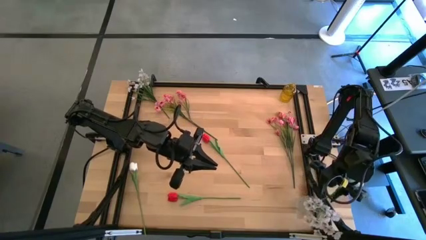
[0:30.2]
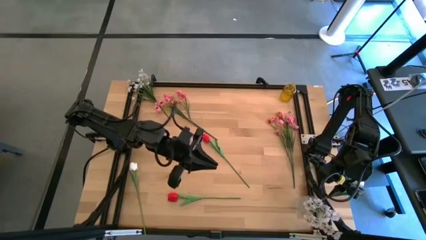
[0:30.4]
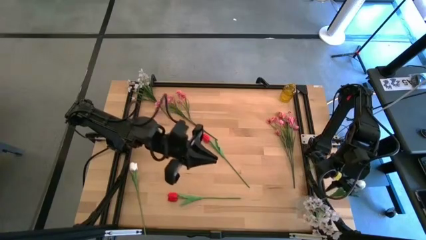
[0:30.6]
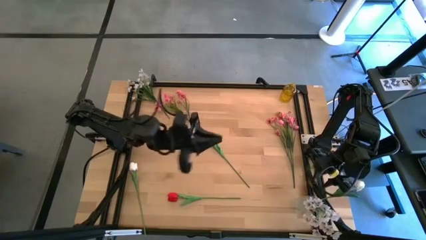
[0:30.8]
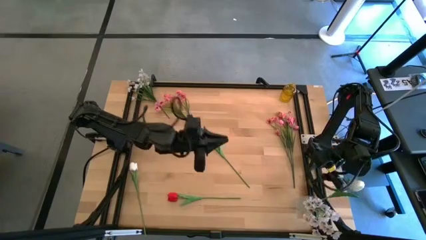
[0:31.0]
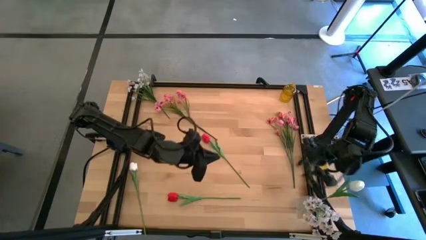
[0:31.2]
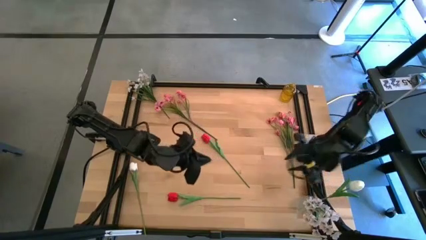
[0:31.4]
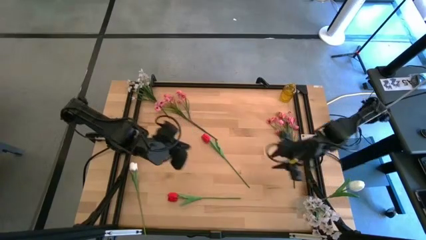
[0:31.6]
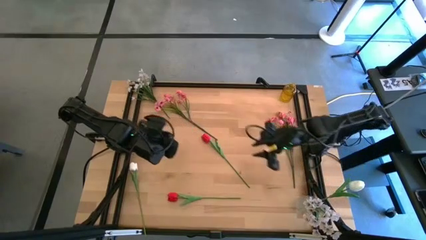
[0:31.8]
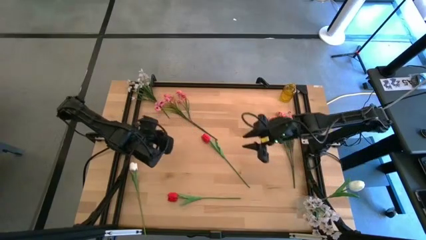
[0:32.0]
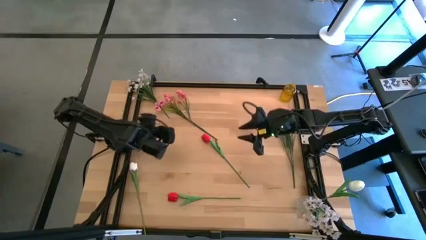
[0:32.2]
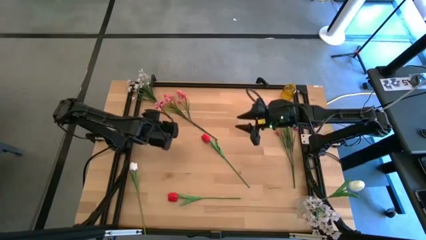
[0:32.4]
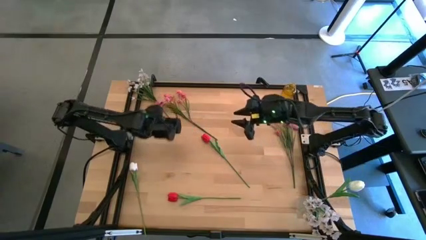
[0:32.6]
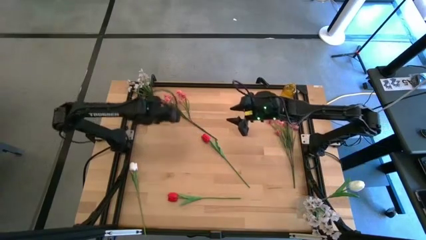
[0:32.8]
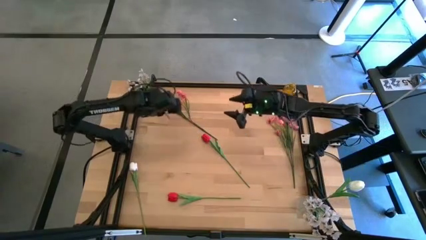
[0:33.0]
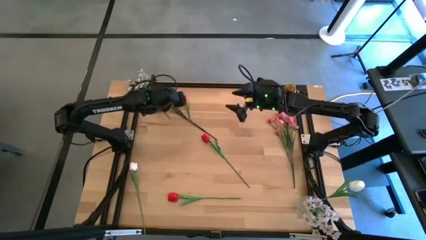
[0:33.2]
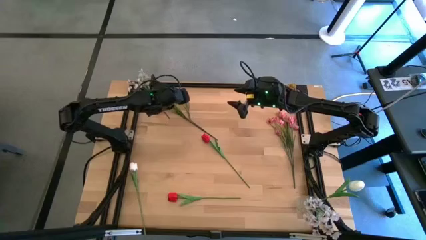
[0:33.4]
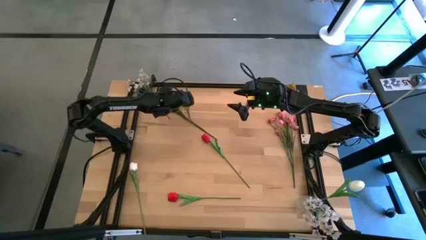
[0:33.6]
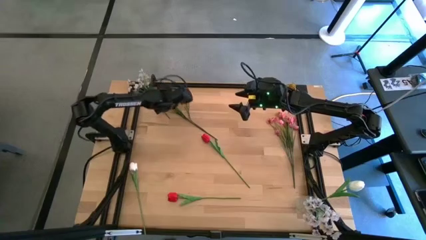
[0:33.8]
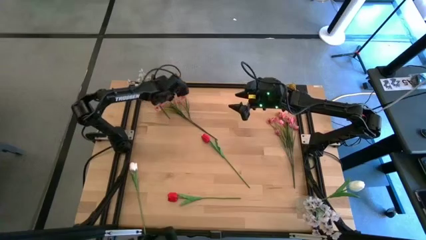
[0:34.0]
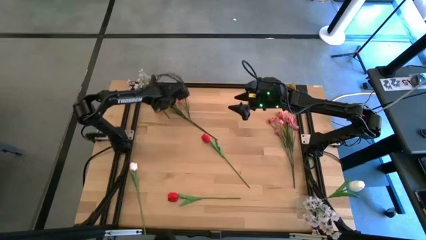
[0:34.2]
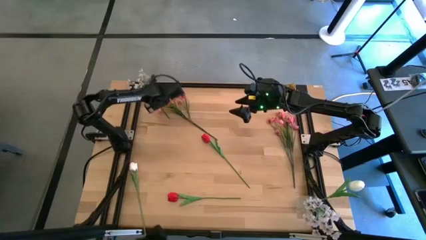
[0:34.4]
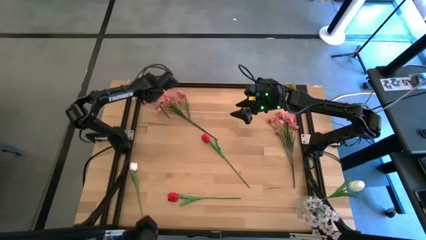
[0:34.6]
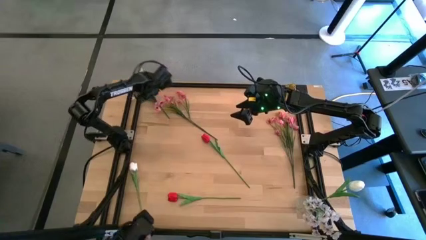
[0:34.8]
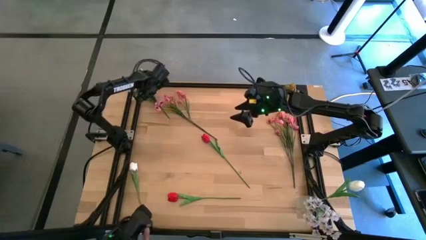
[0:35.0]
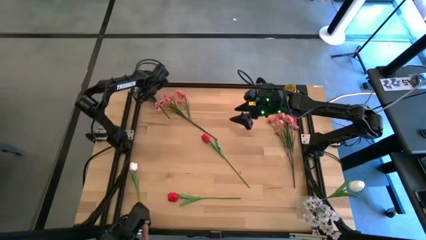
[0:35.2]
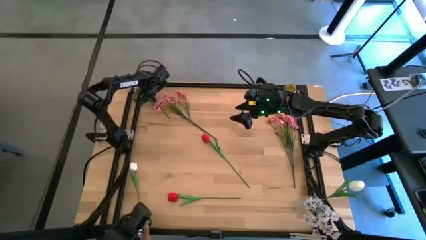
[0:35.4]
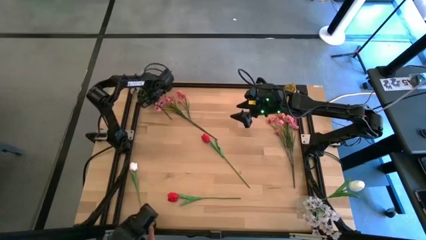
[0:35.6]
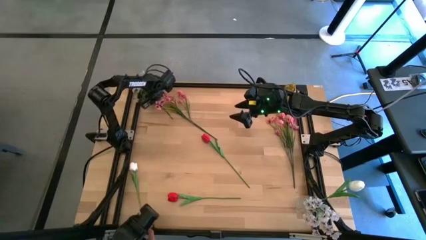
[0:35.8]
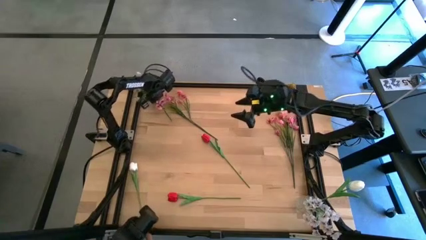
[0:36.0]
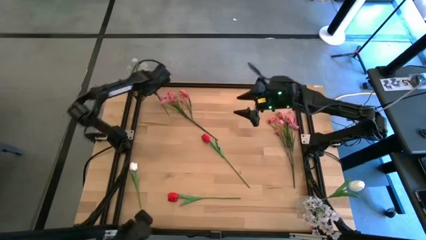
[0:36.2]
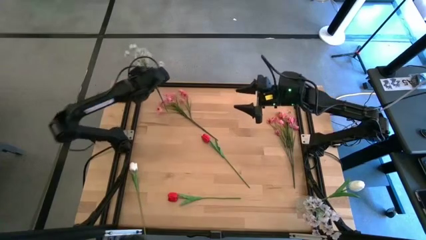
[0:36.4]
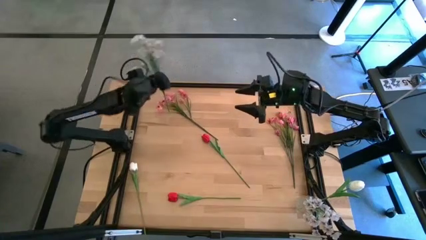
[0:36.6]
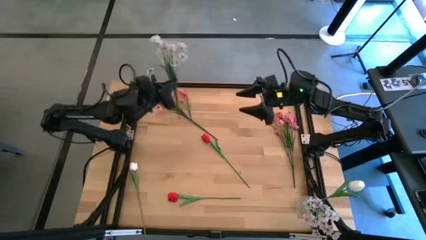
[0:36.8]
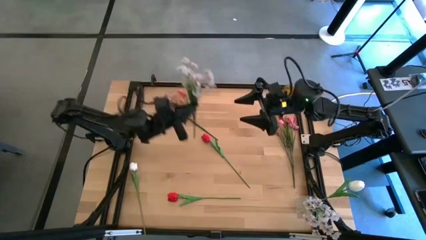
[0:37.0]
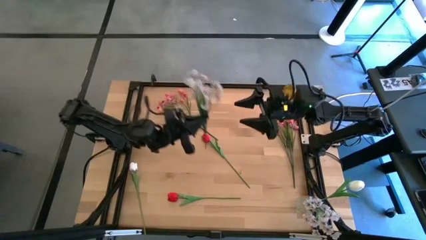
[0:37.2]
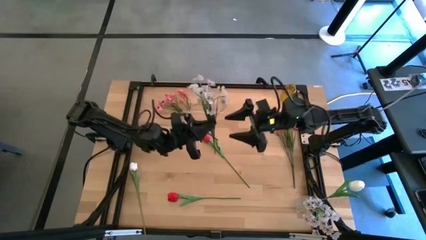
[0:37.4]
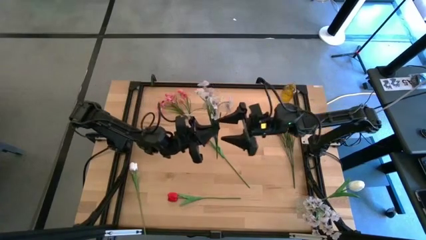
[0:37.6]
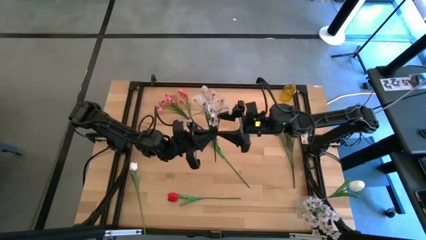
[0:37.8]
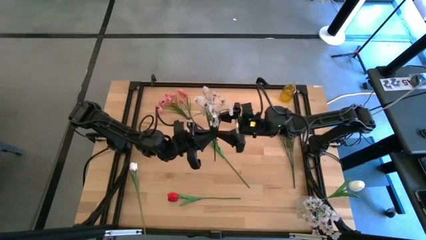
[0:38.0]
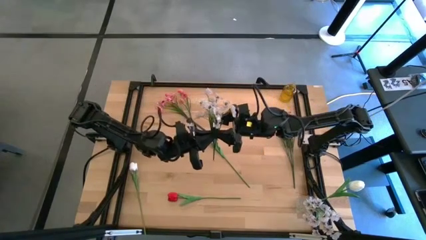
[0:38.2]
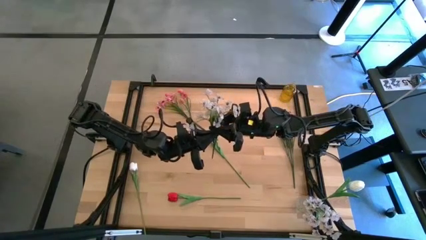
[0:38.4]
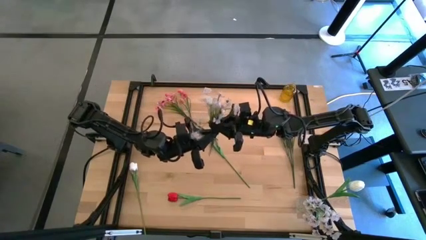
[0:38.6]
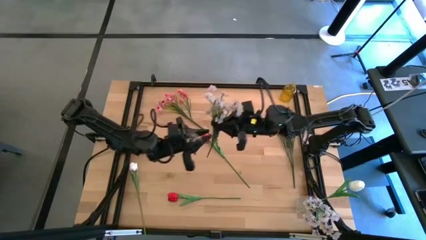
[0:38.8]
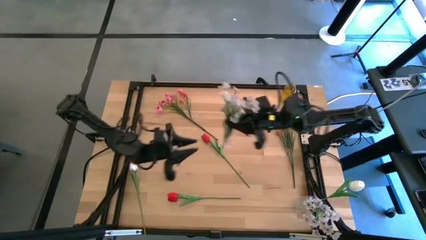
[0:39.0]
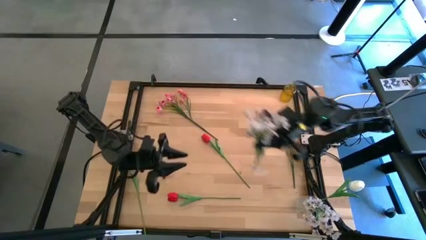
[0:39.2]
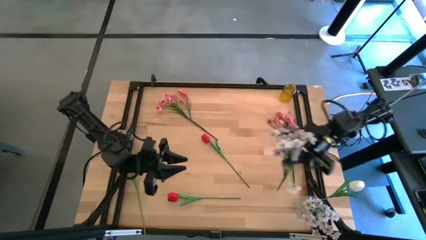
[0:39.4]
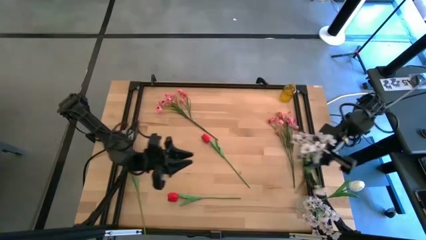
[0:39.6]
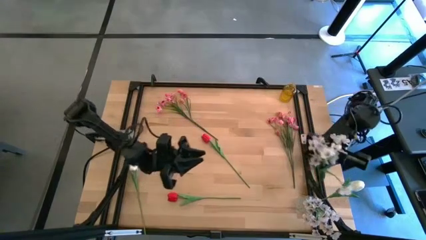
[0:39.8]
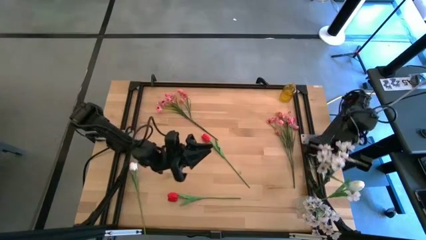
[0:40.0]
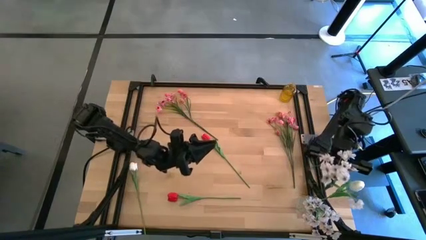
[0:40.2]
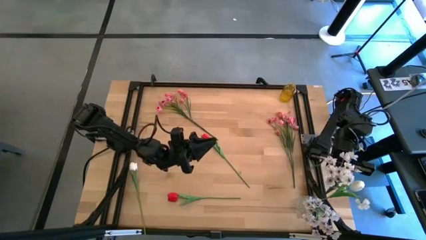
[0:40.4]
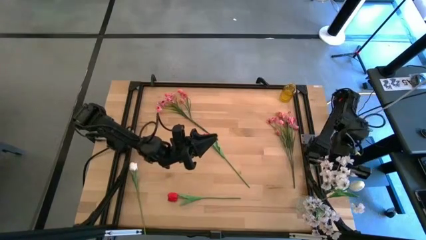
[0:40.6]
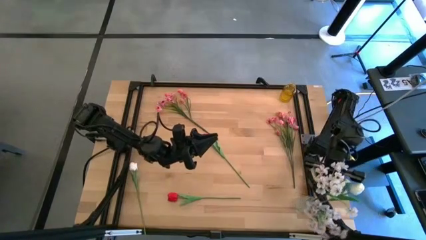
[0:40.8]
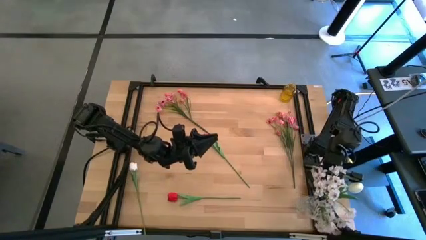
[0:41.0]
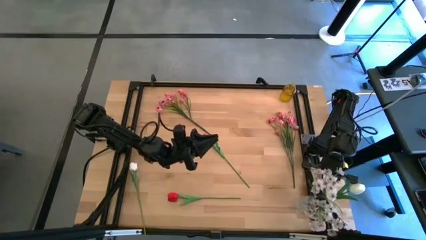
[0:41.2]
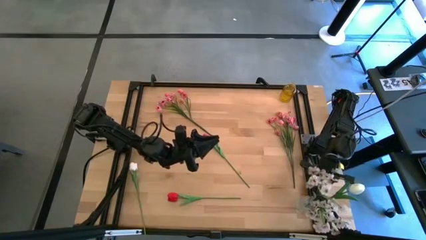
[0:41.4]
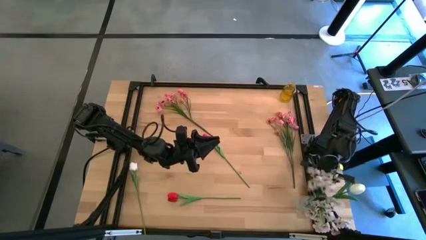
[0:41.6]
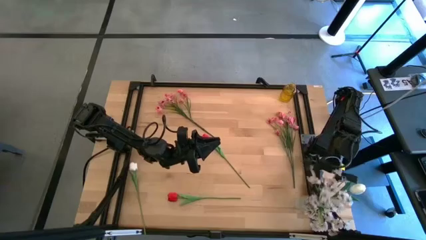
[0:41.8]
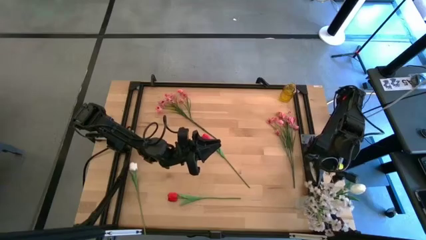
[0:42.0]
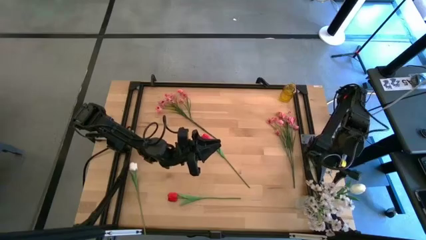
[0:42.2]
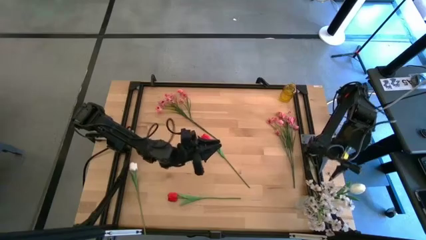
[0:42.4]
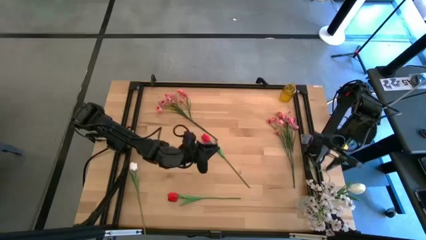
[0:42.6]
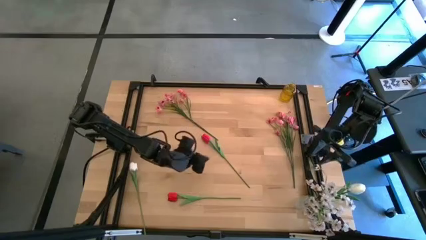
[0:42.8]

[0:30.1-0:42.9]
Task: Sort flowers into vase by color
Put the white flowers into the transparent vase
